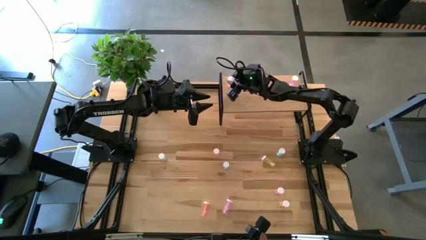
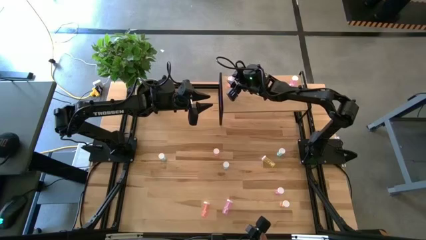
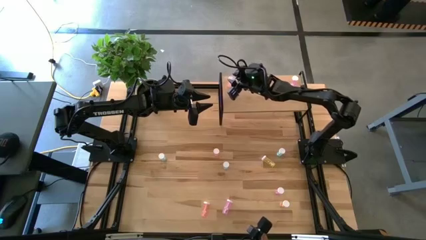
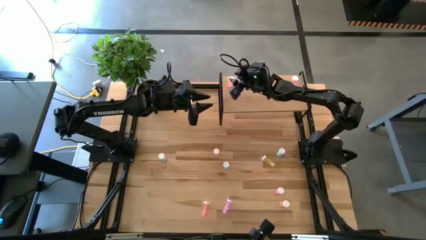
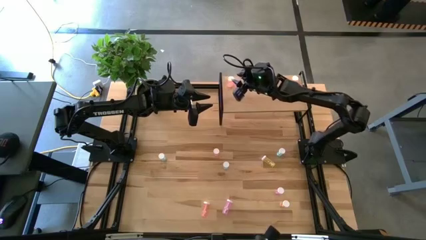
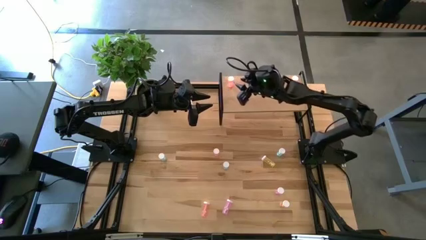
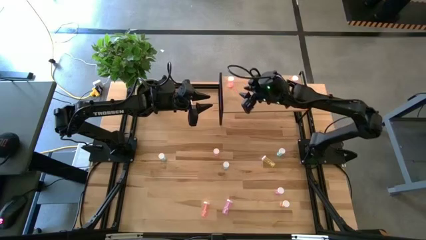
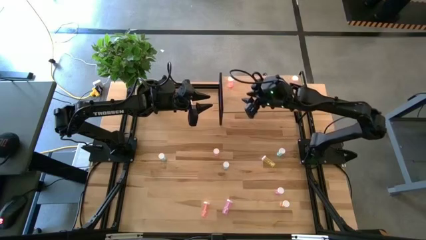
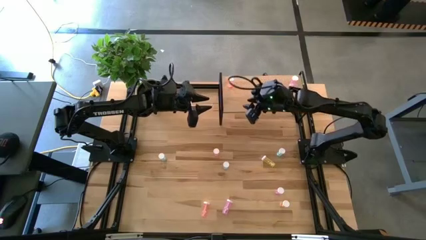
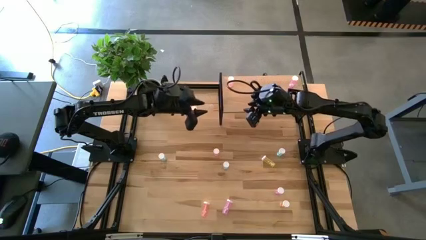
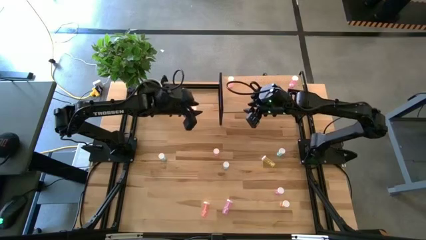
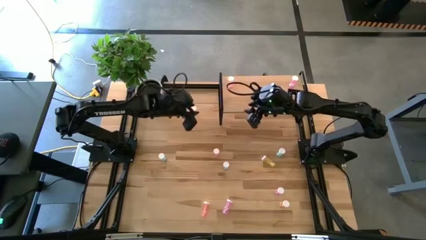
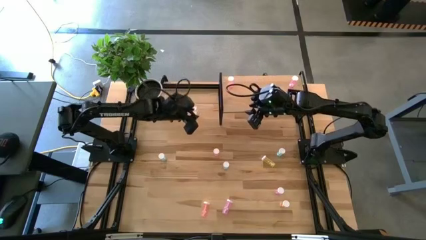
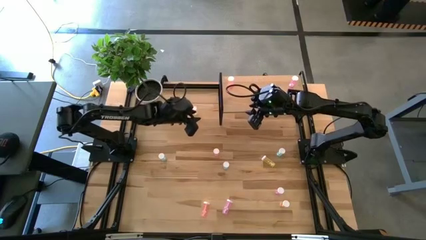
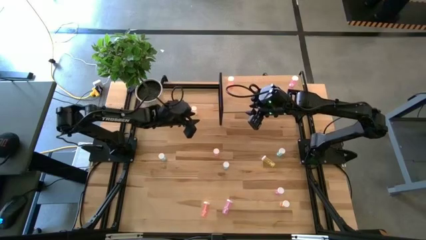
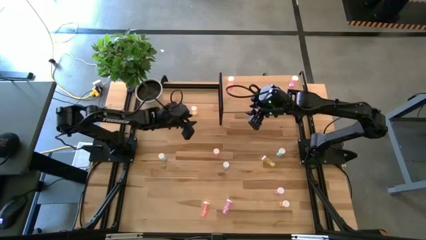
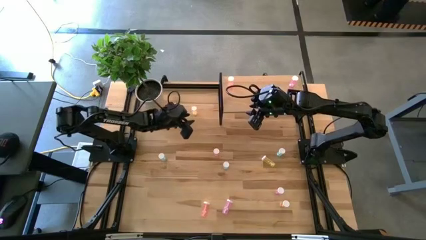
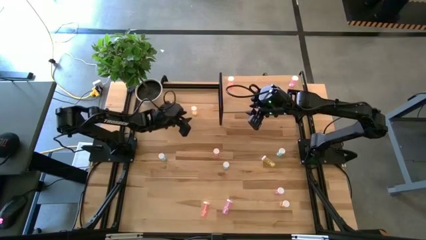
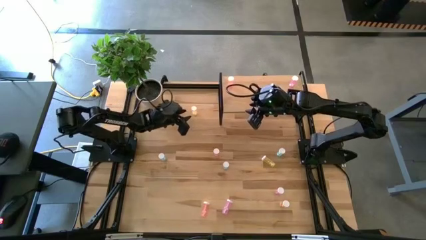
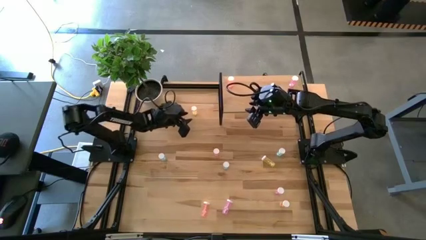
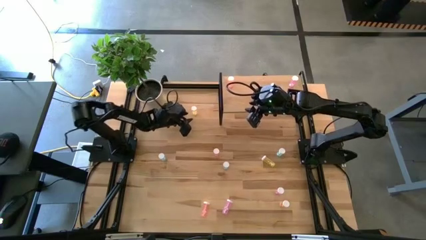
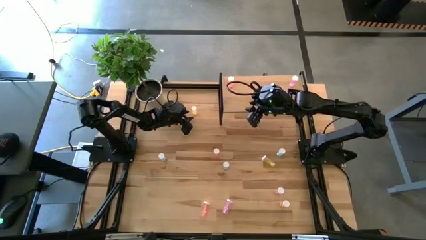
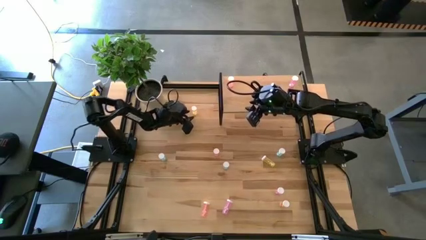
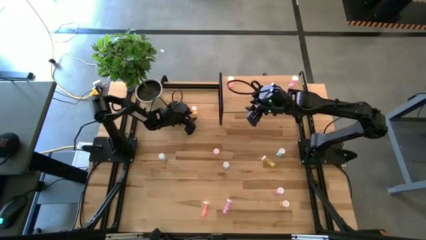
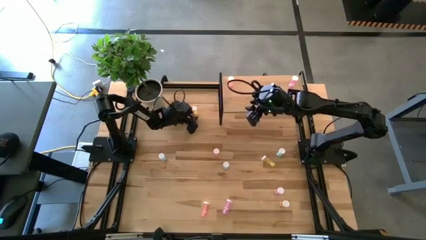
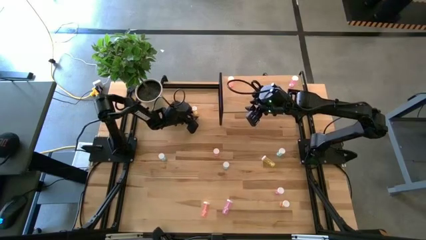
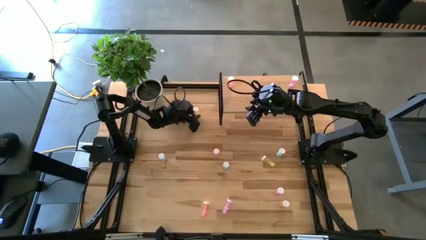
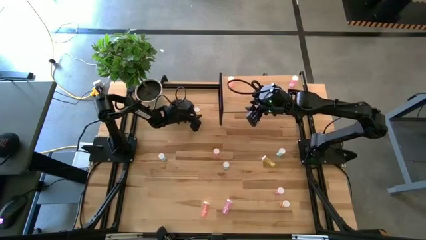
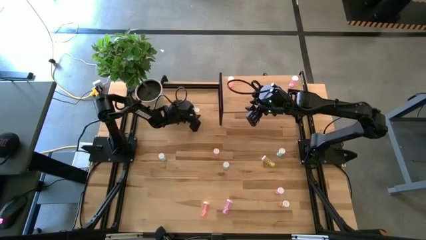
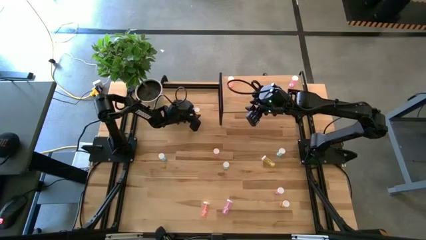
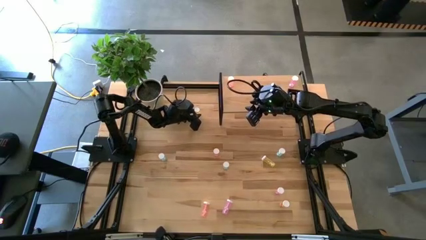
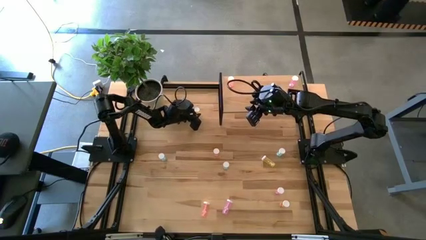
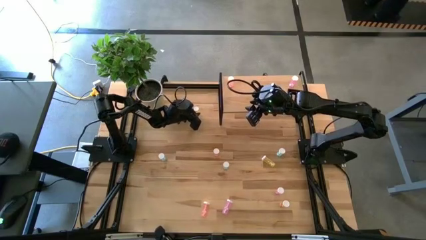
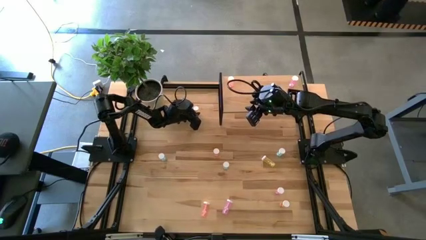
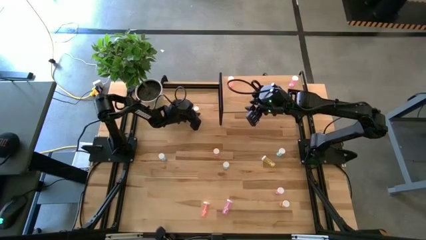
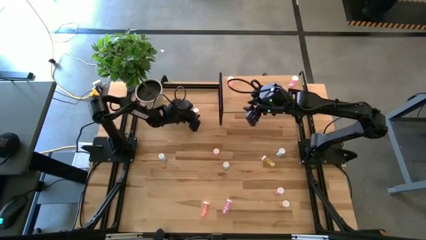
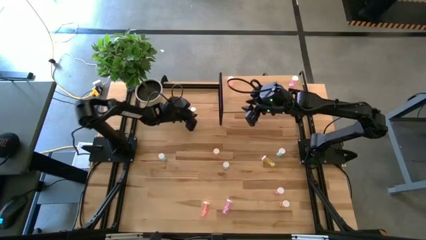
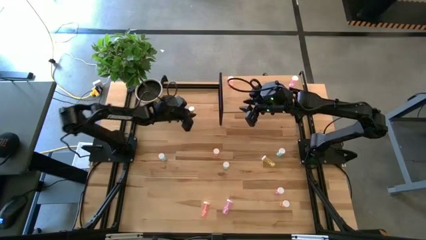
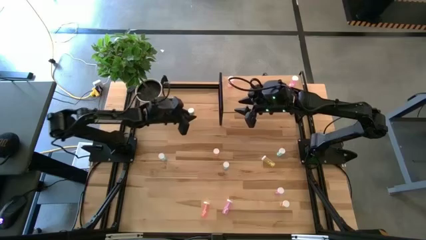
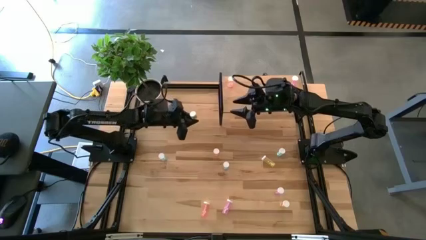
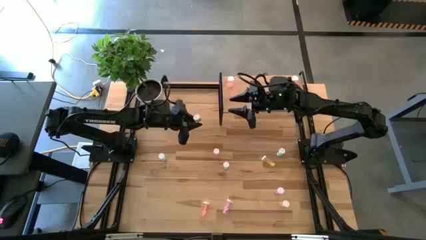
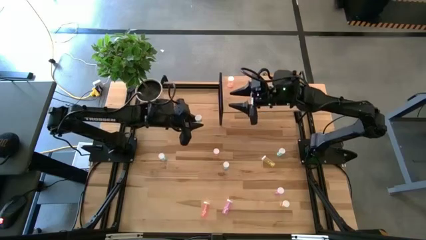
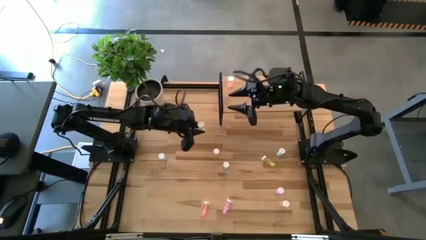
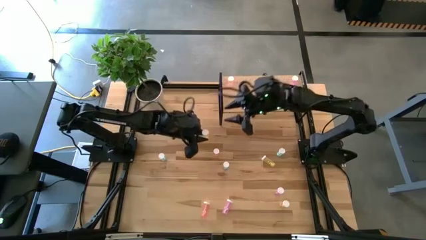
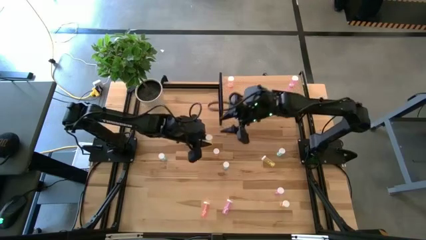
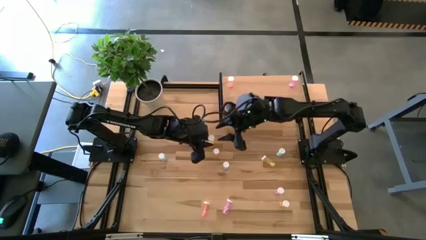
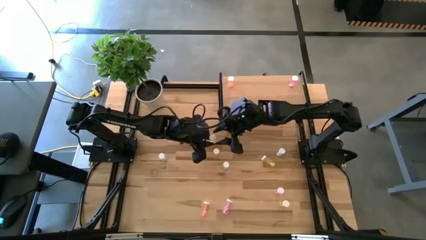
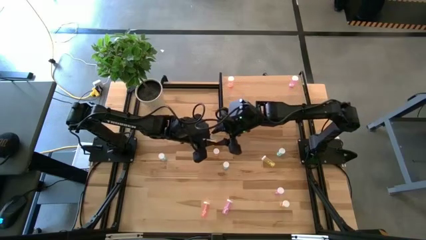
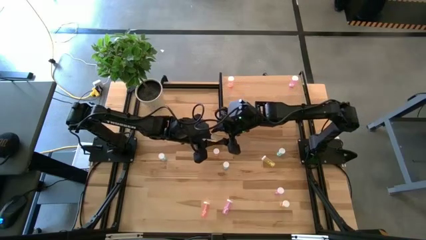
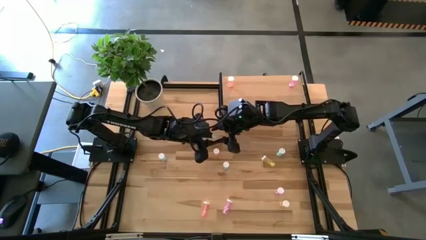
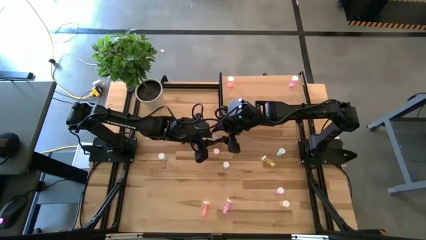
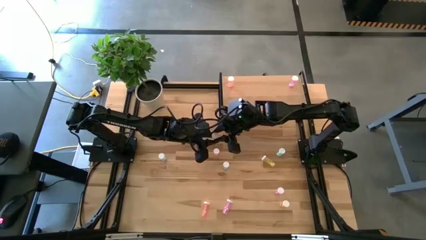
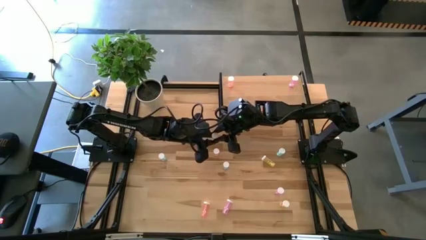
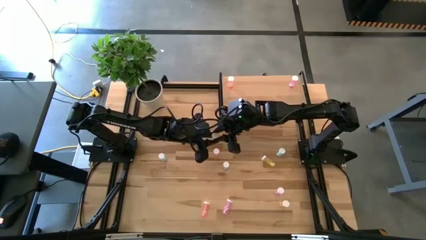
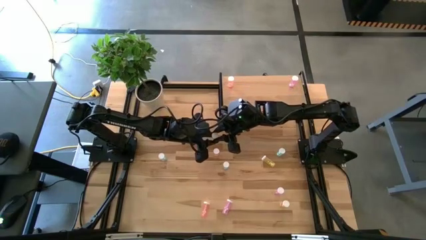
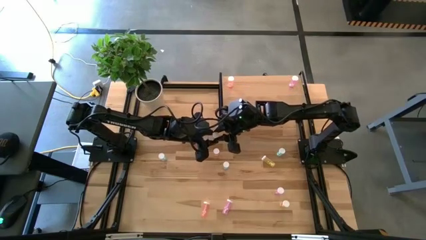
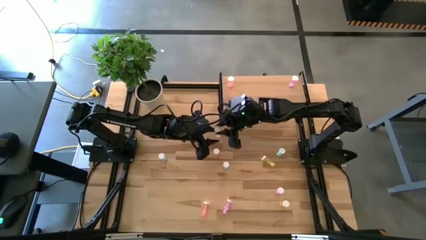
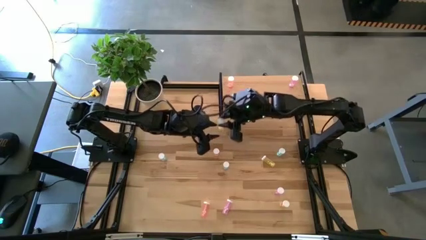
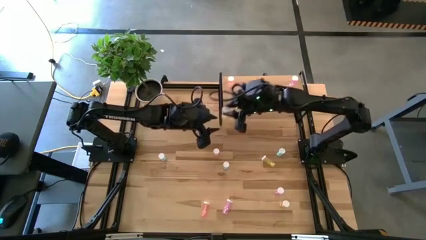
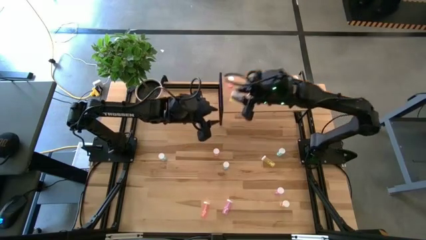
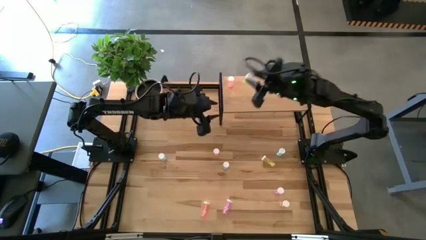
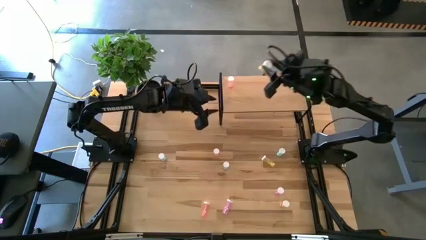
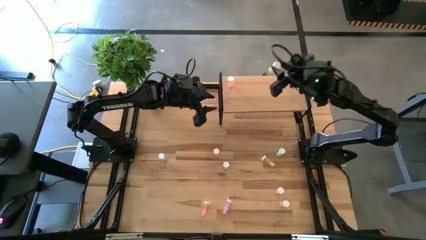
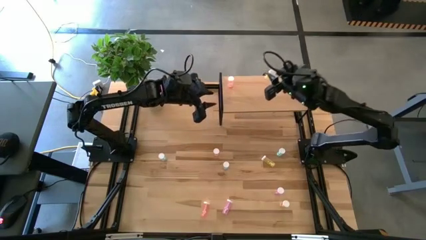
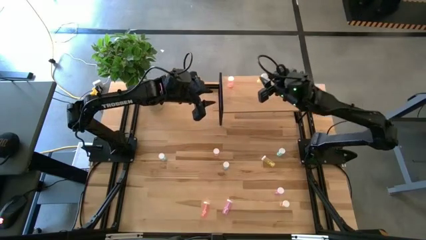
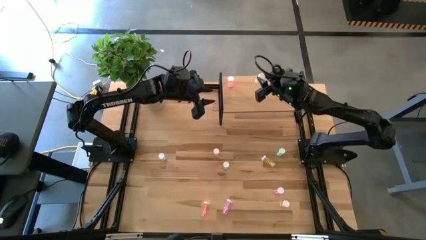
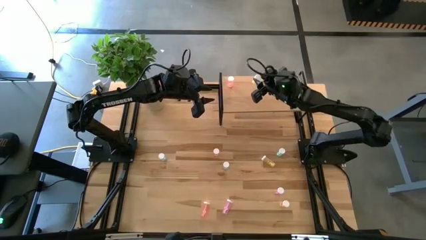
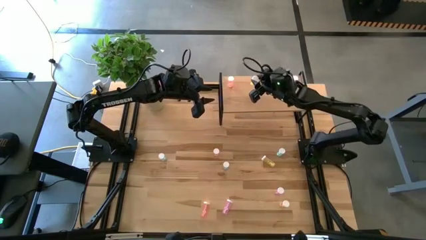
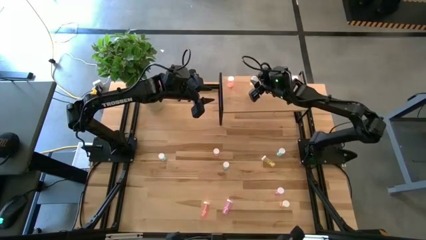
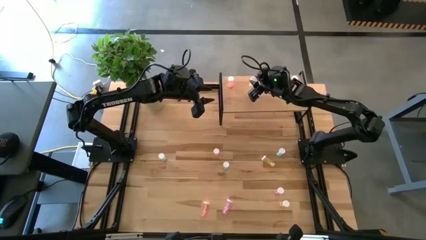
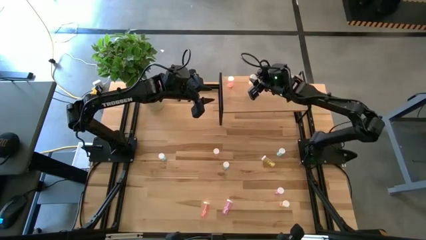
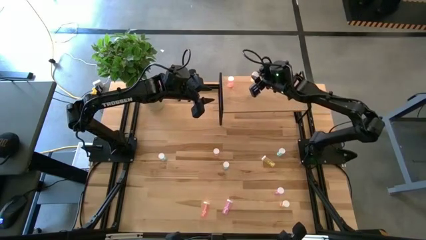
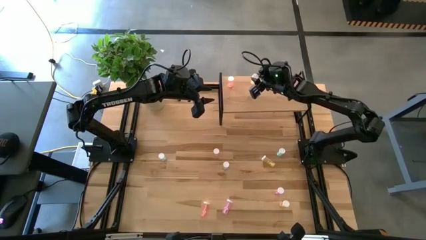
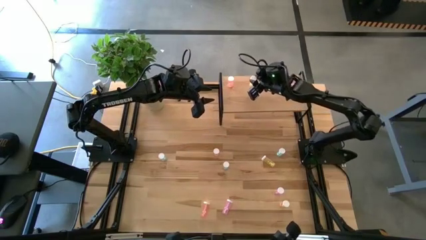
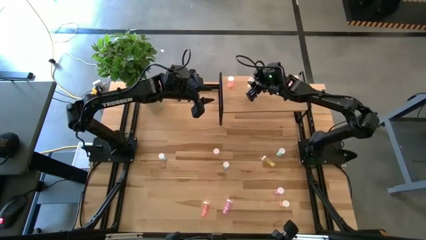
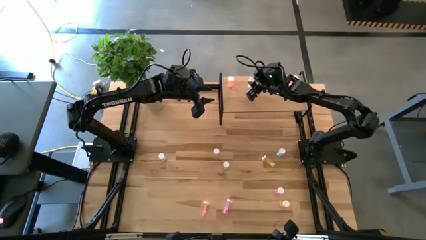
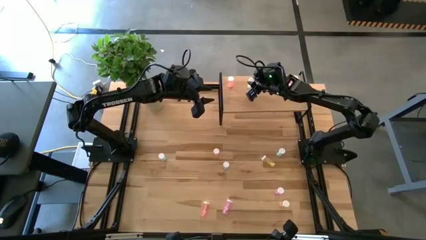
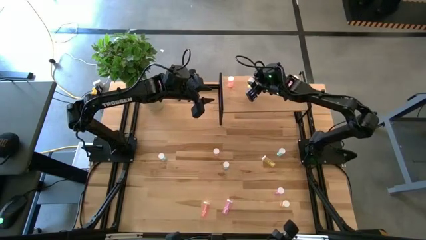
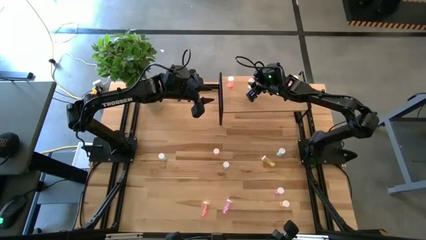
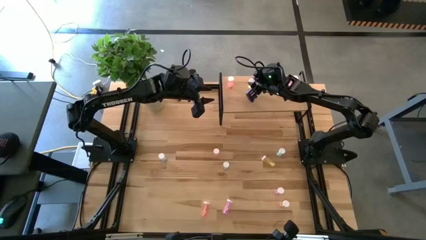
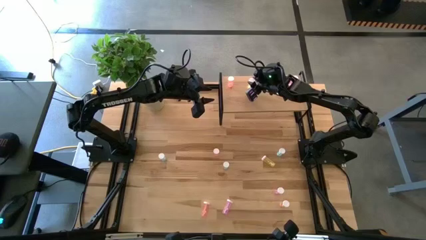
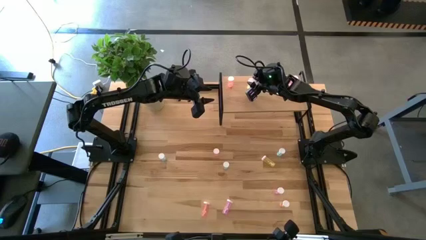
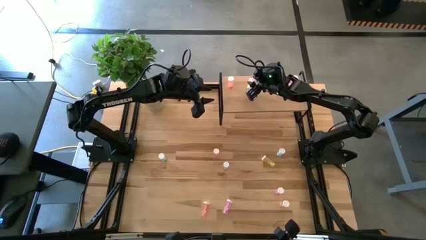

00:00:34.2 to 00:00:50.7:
Task: Pick and place medicine bottles onto shelf by color
Put the top yellow pill bottle on the shelf

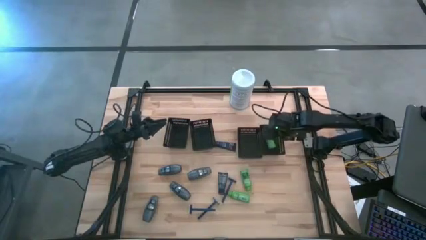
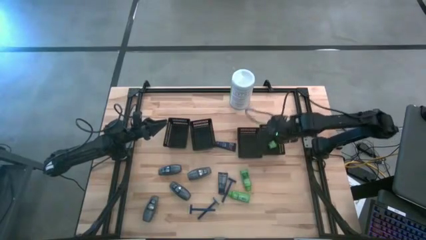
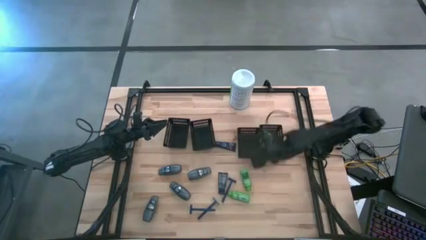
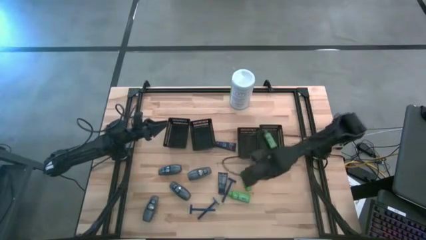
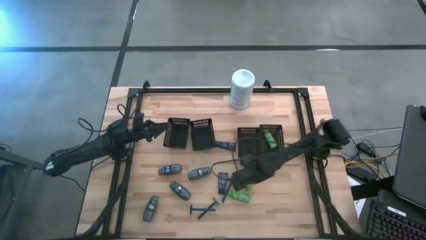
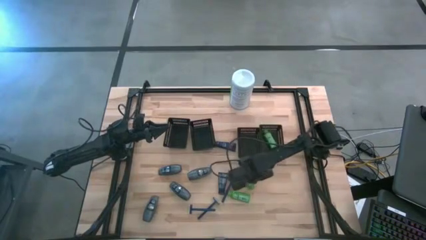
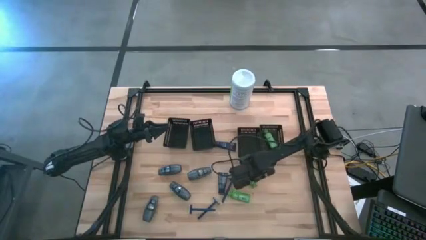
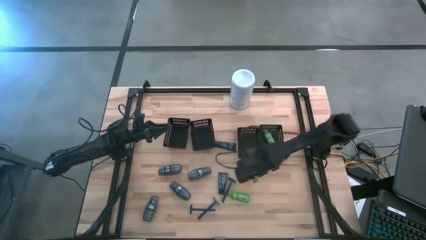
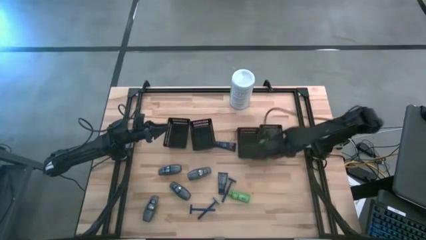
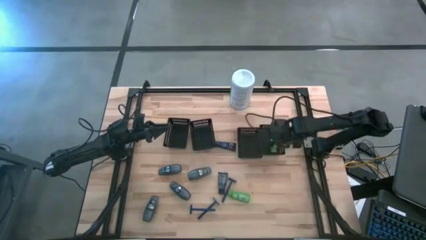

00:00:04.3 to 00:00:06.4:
Task: Pick & Place Travel size toiletries
Put the green shampoo into the right black bin
